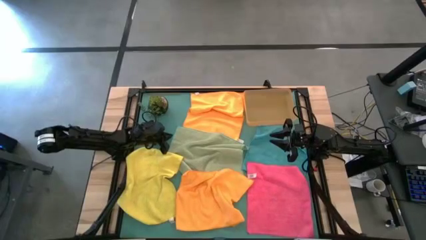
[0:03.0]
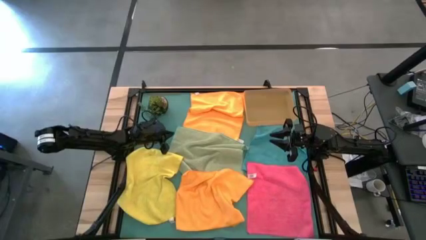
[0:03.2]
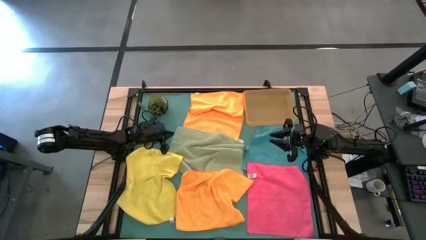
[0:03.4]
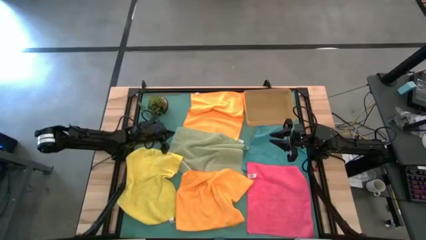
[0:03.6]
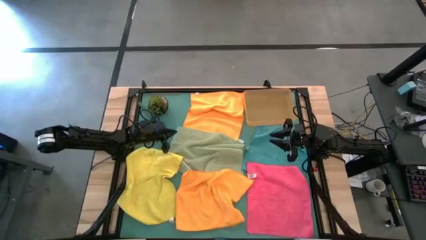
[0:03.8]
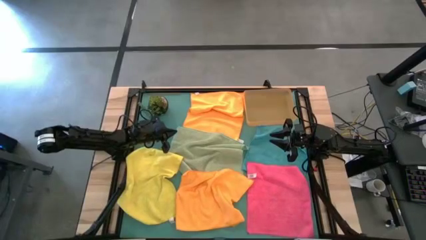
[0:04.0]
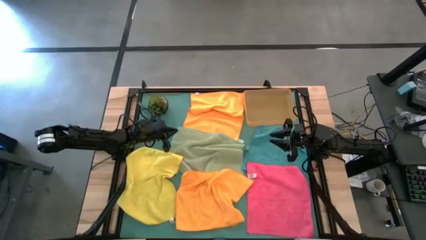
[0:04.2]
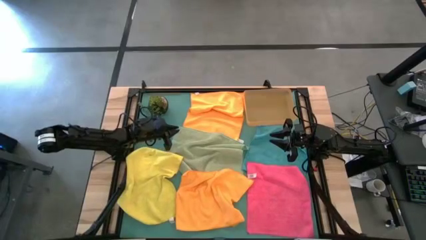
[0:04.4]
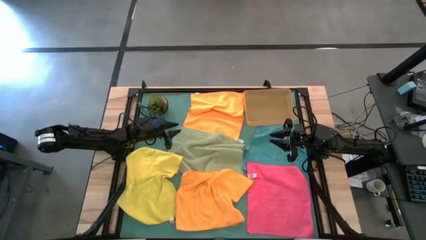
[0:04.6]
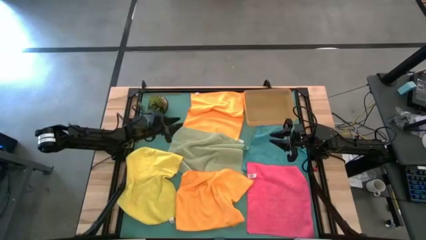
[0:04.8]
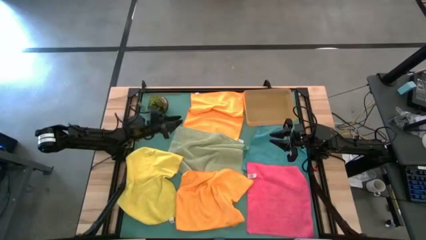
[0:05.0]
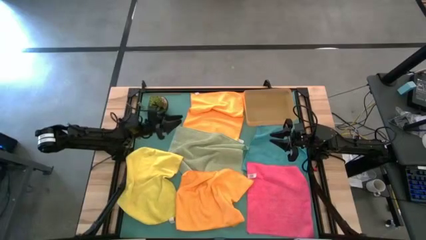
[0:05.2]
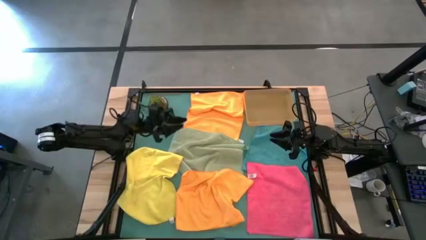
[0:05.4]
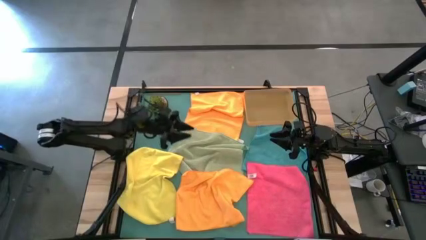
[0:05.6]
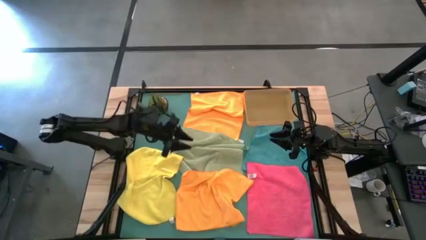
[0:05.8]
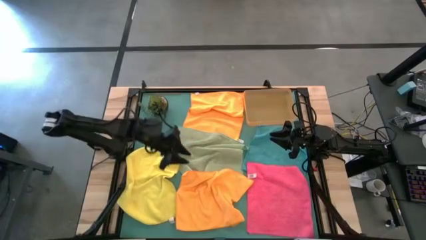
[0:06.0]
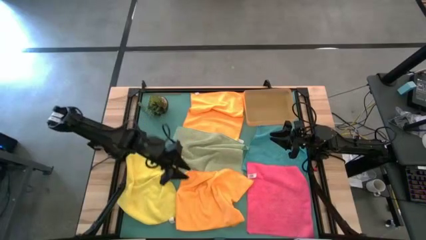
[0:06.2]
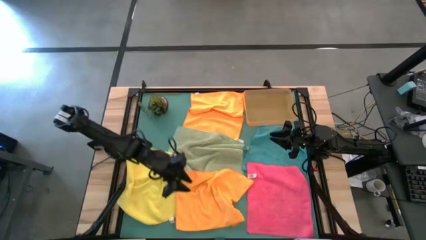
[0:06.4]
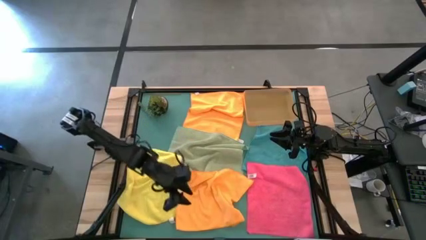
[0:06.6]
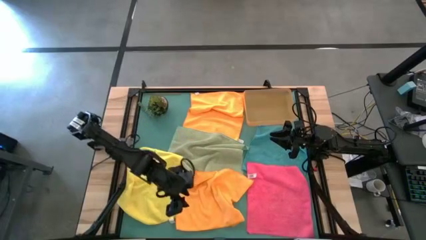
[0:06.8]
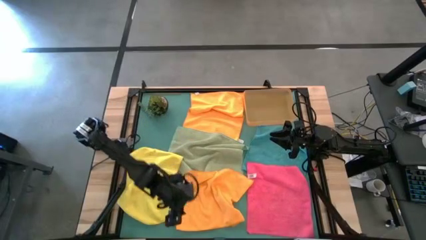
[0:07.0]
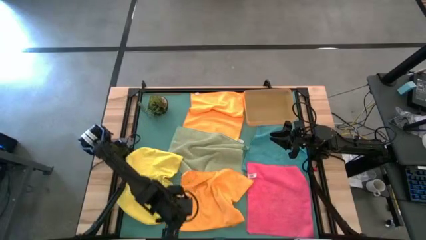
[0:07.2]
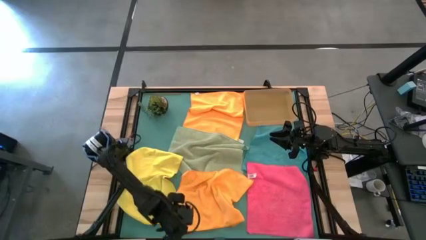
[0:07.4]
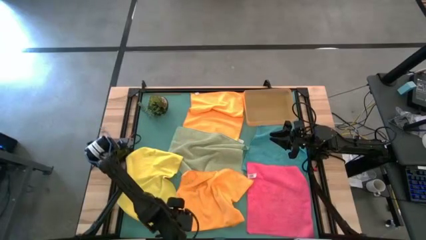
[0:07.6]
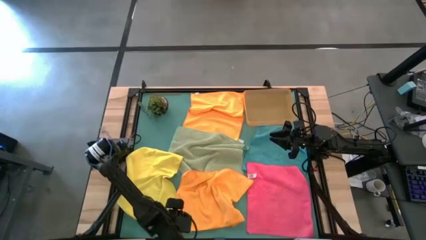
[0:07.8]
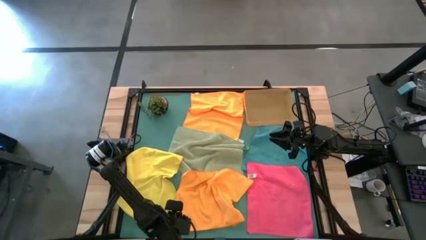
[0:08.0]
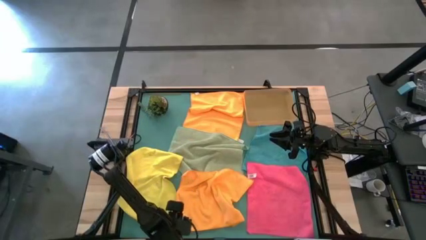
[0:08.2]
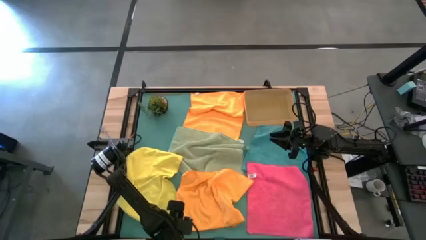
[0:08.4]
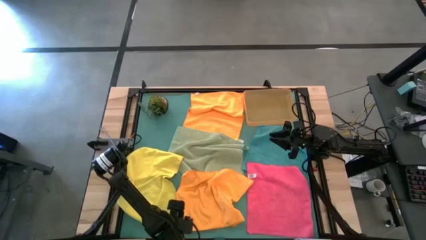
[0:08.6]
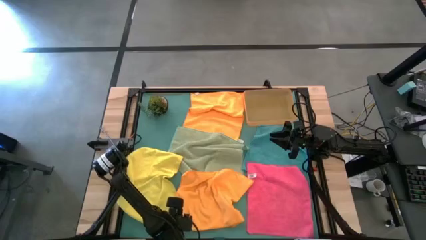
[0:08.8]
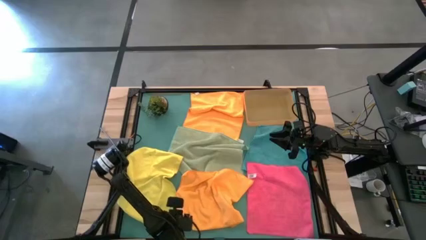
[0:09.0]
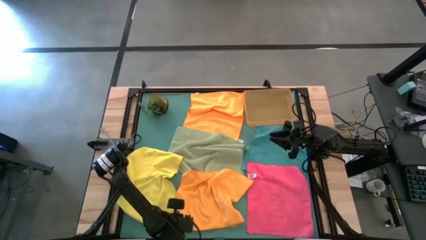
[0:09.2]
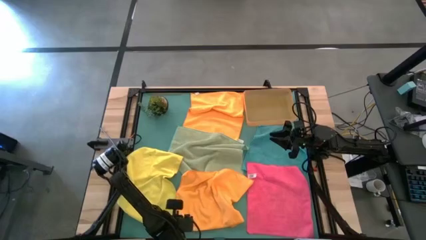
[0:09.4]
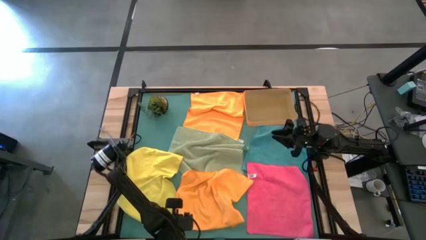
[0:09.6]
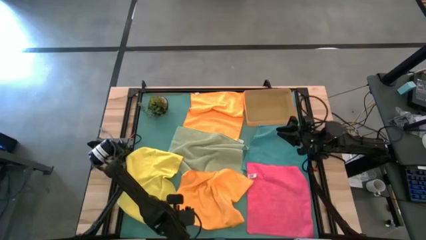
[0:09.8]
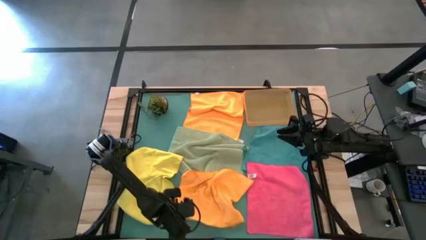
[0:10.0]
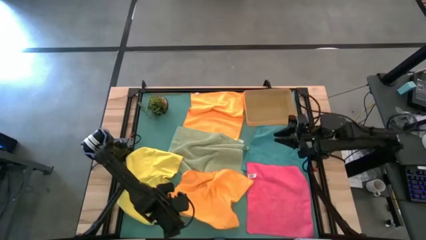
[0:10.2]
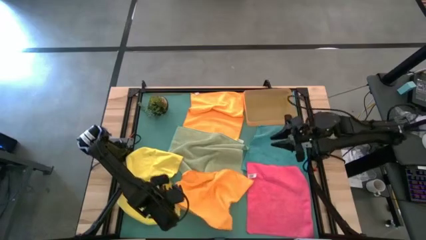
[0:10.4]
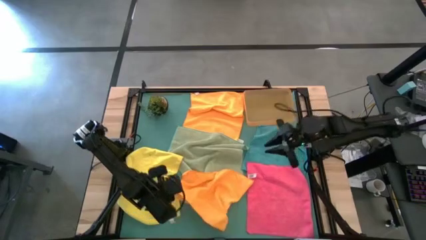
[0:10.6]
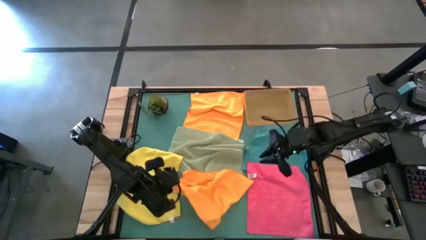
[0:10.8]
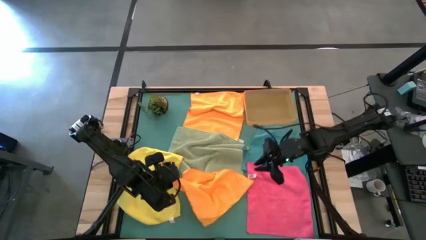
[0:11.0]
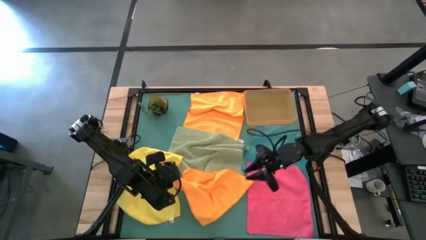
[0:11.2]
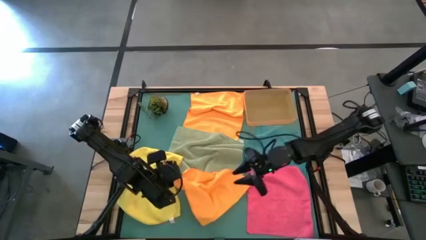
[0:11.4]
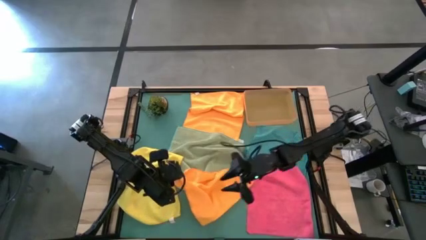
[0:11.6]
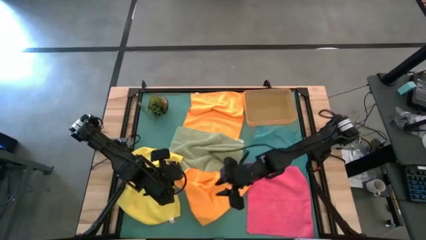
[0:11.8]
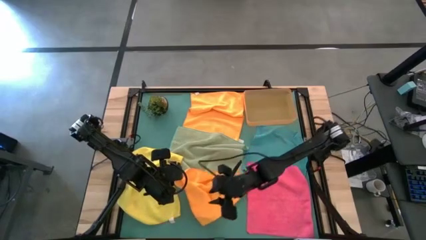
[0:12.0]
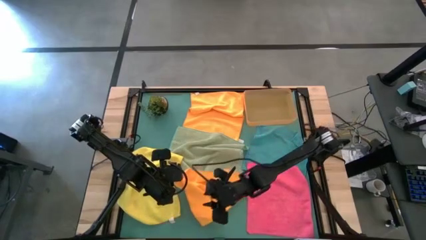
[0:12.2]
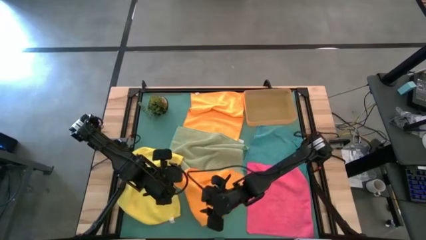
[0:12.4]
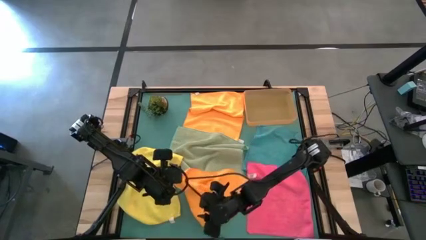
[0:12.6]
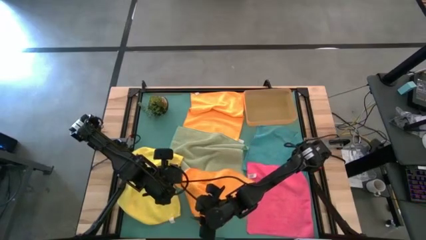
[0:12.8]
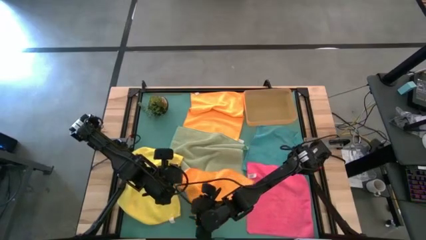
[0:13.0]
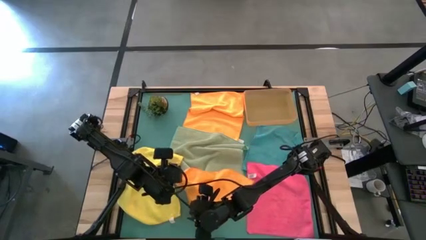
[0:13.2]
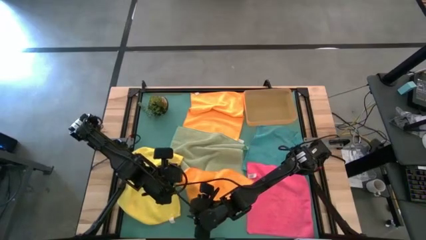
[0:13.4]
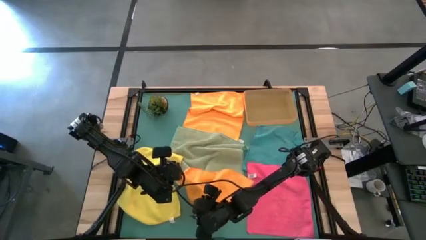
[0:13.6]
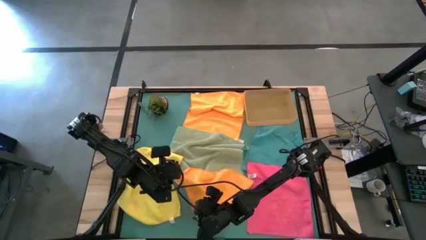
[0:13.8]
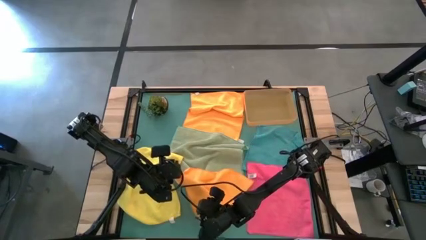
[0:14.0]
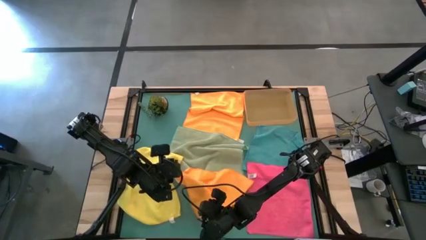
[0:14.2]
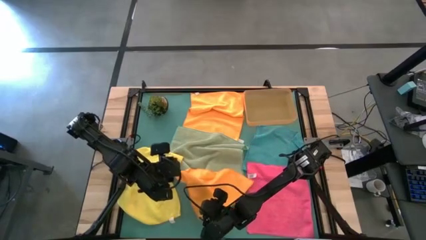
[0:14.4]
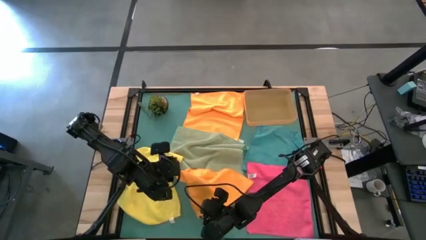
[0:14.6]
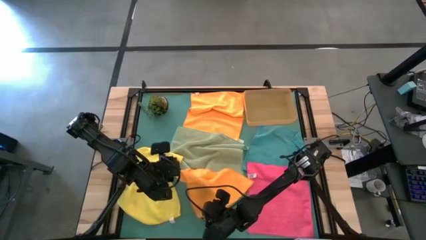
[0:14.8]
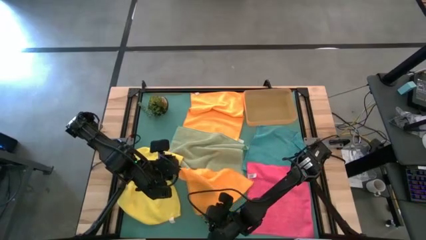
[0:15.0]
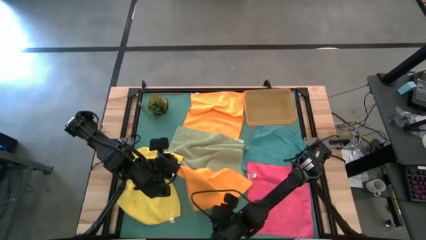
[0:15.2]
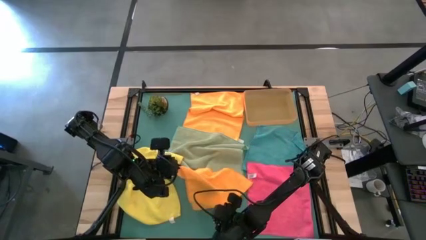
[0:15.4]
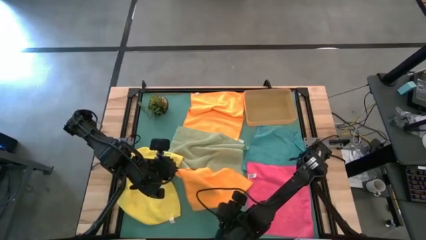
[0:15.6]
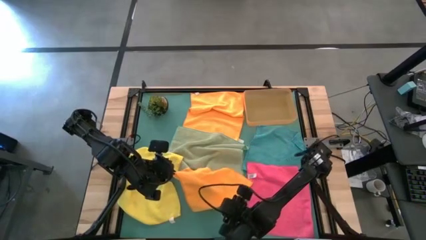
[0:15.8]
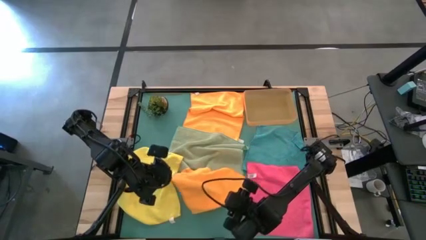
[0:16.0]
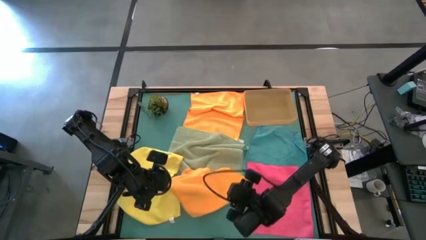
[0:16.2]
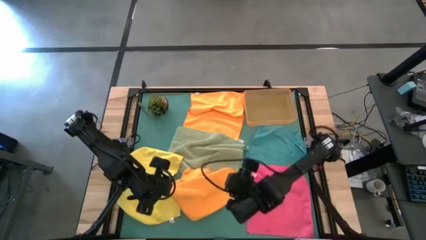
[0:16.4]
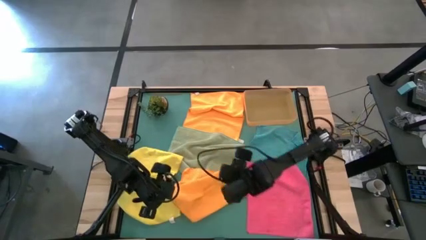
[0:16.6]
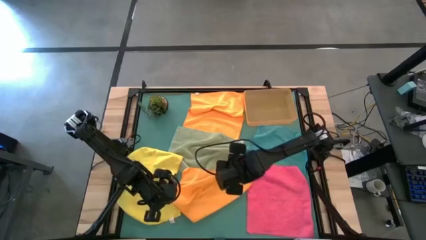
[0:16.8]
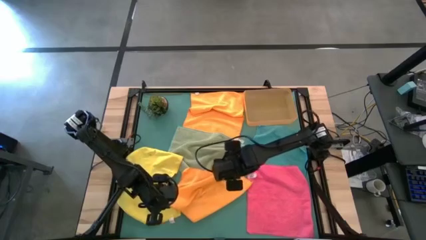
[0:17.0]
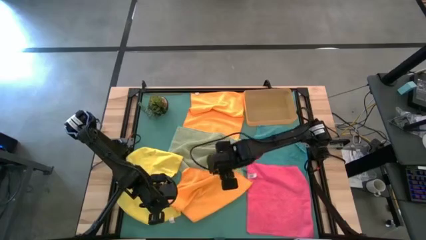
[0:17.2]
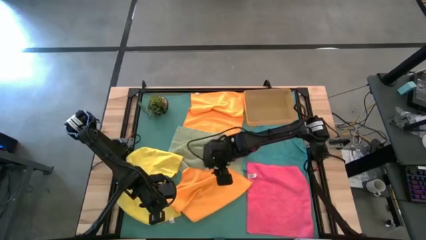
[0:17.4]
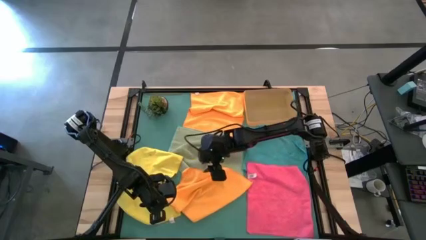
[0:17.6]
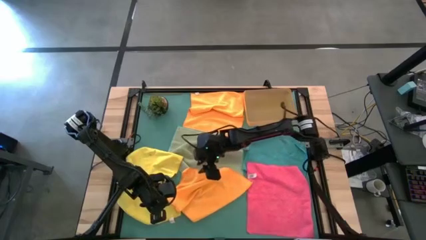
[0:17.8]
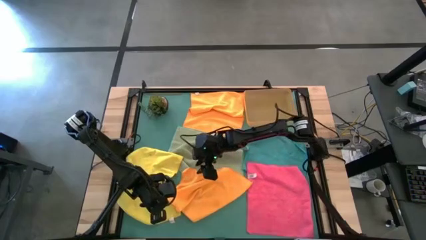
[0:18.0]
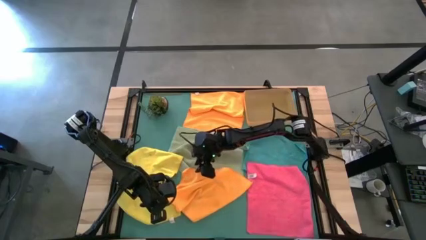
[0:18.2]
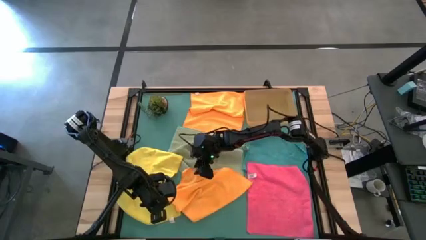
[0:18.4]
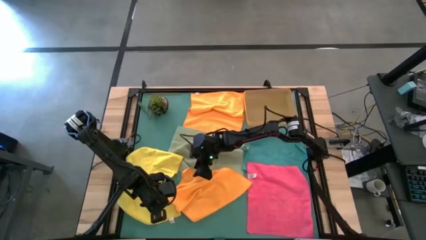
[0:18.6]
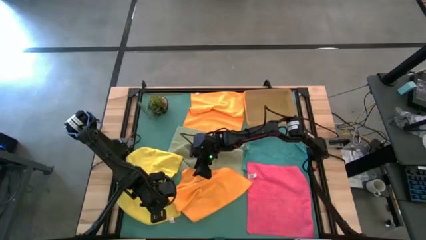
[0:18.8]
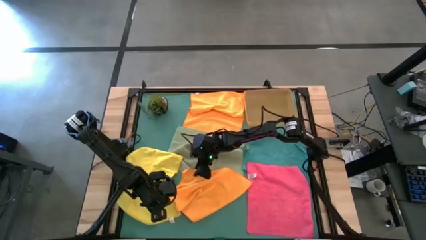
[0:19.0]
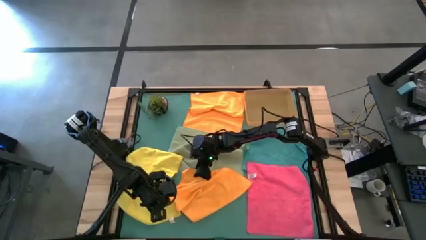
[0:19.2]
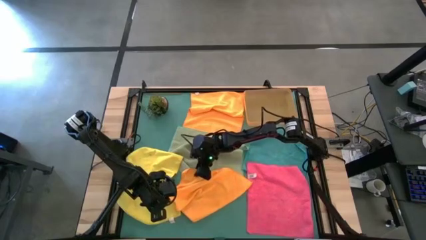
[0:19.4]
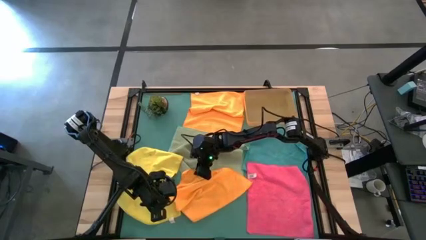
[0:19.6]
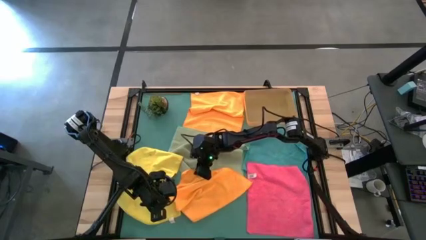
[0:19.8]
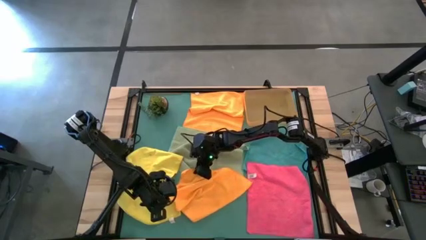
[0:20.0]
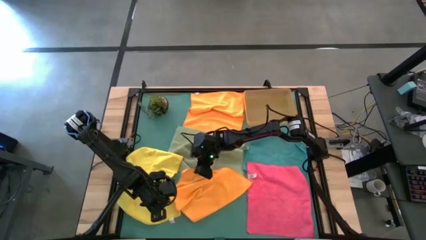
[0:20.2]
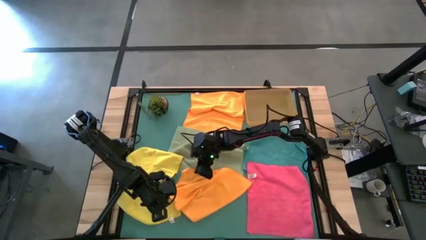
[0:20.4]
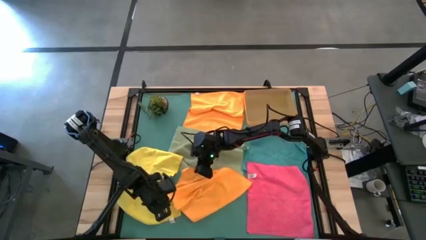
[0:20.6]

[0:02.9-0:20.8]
Task: Fold microfiber towels
Fold the bottom orange towel
